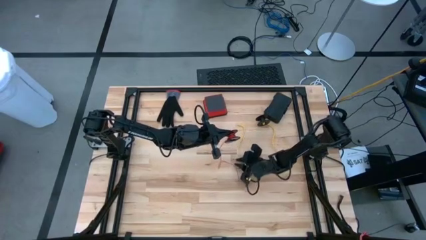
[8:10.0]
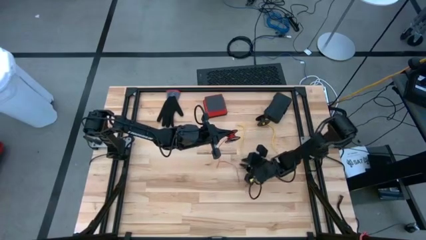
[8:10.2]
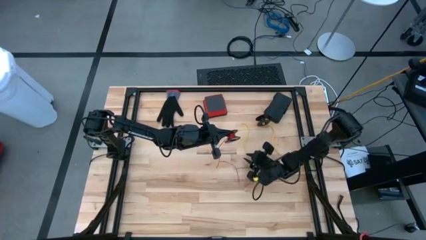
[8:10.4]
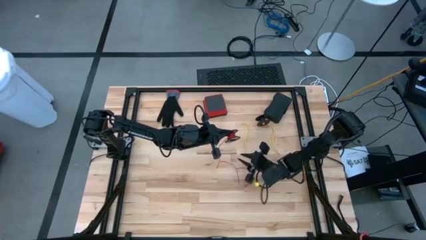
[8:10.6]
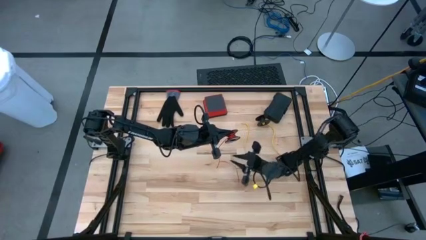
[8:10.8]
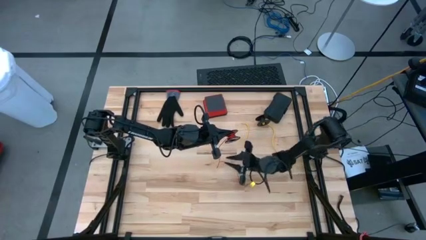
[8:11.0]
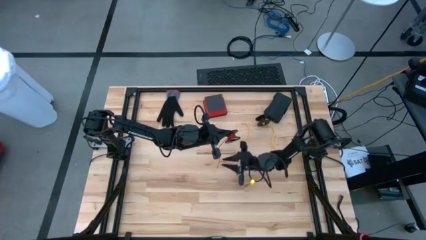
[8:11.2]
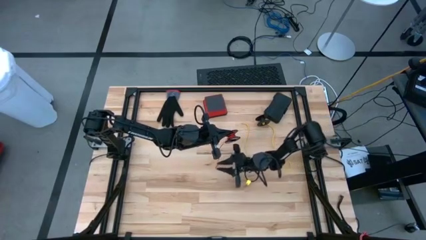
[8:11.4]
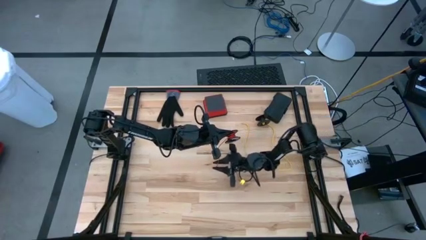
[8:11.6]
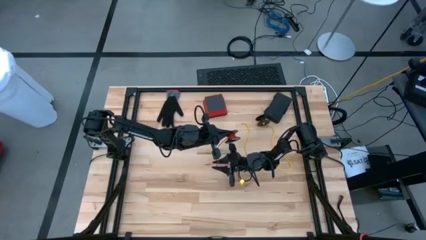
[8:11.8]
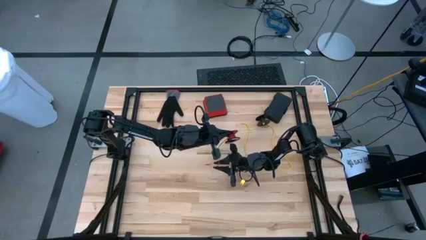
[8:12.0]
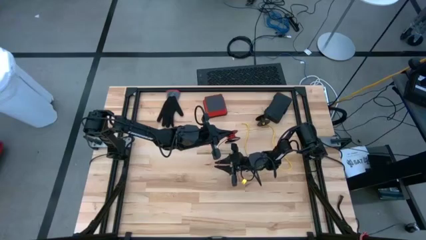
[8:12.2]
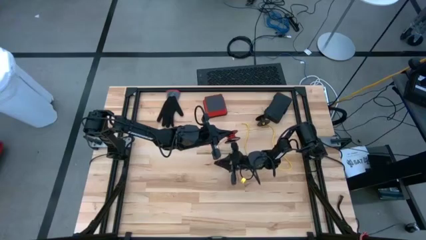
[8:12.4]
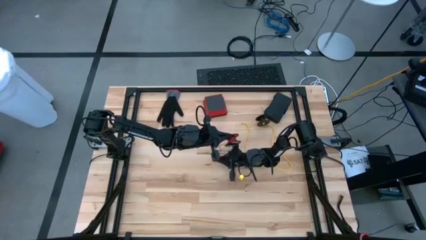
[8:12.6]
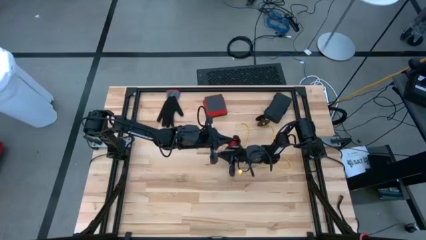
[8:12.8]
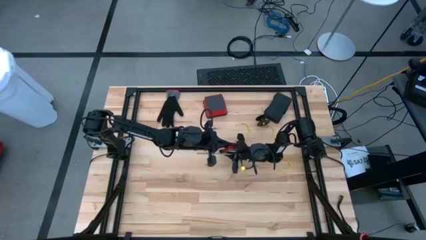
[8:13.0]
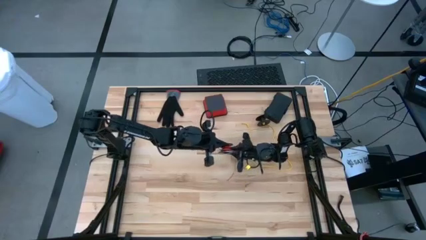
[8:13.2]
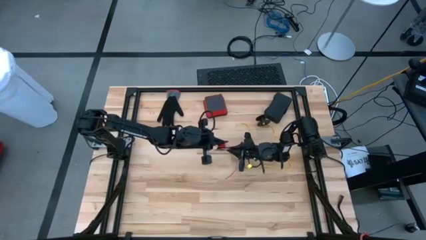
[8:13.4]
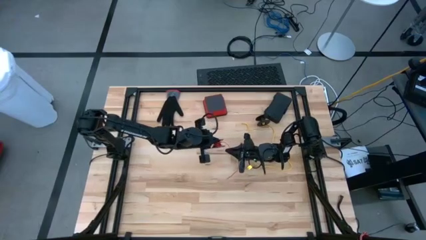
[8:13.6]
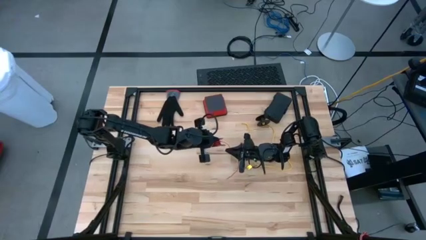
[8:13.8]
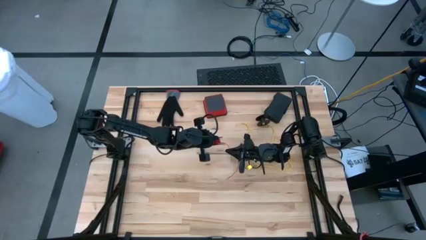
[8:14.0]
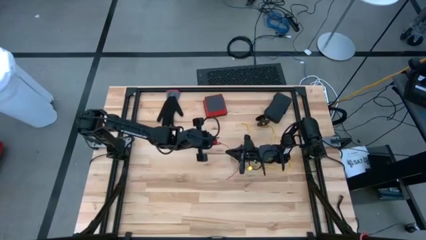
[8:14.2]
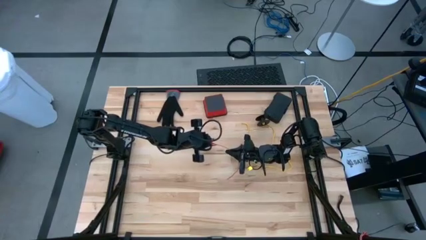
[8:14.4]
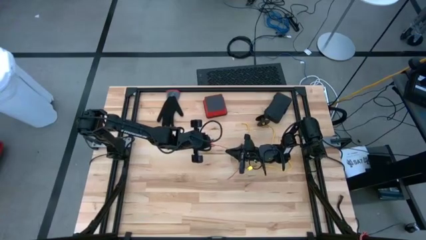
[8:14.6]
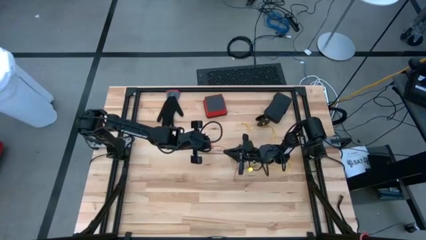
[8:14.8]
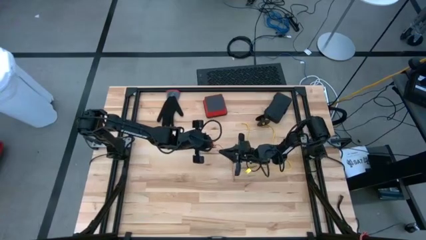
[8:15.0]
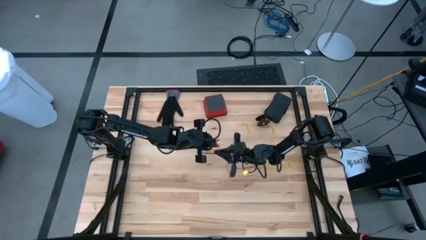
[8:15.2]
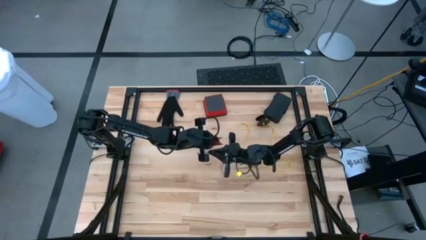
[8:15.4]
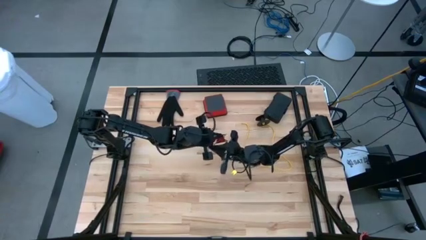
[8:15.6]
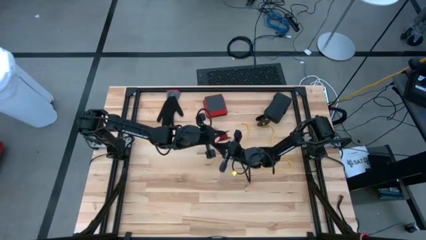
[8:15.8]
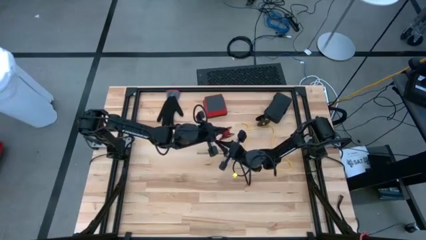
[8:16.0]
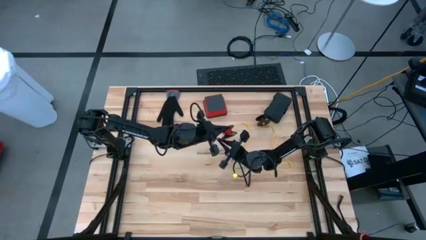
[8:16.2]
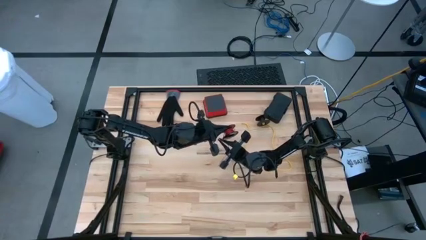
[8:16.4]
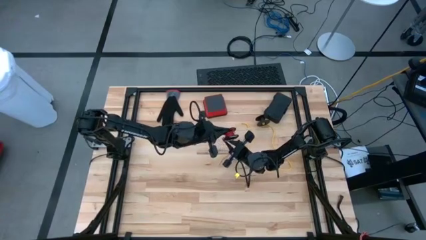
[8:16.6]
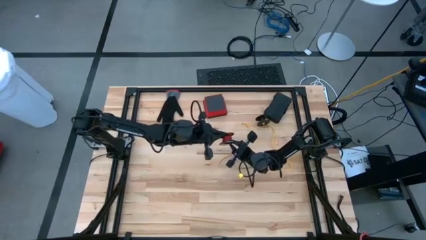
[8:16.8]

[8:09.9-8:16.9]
Task: Coil cords
Coil the red wire onto the spool

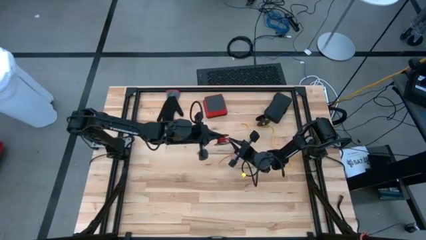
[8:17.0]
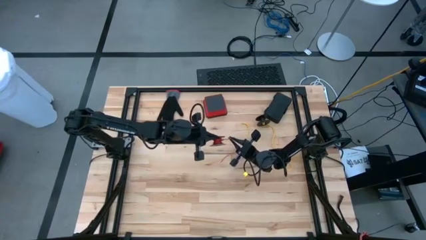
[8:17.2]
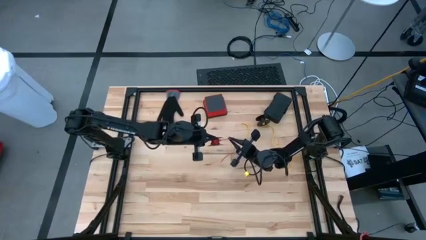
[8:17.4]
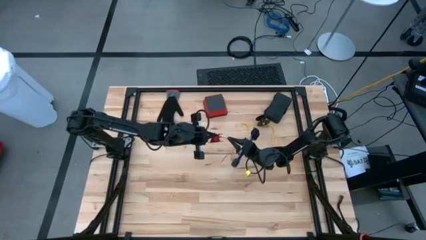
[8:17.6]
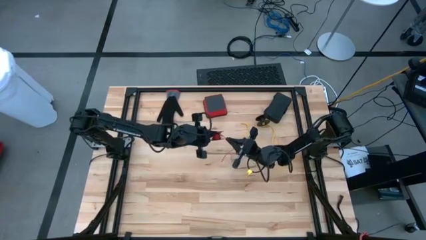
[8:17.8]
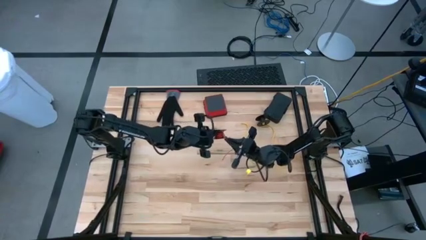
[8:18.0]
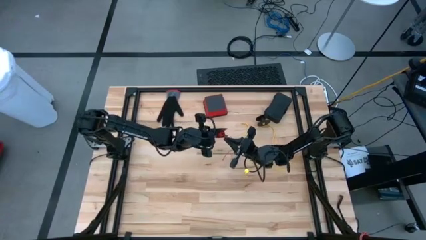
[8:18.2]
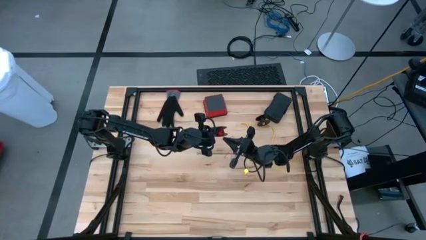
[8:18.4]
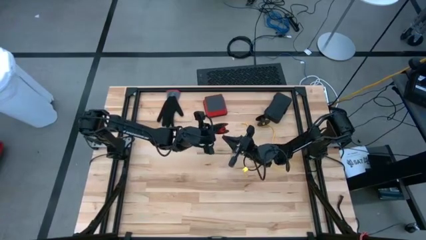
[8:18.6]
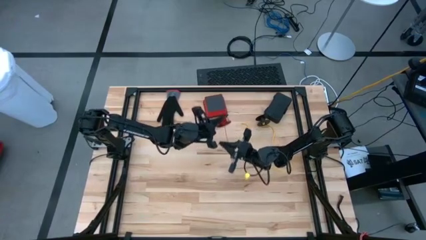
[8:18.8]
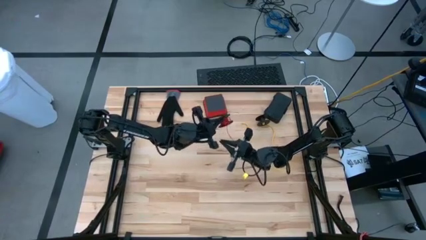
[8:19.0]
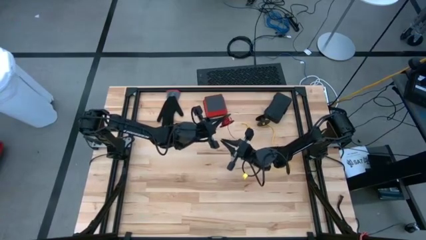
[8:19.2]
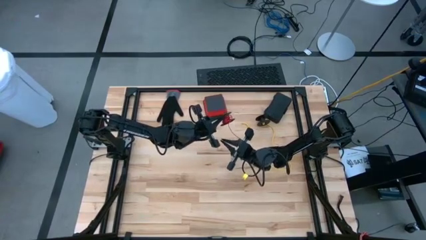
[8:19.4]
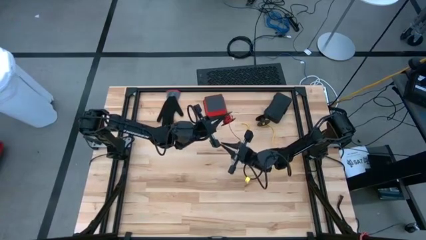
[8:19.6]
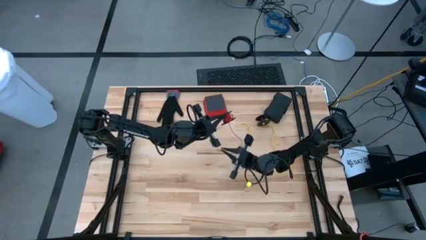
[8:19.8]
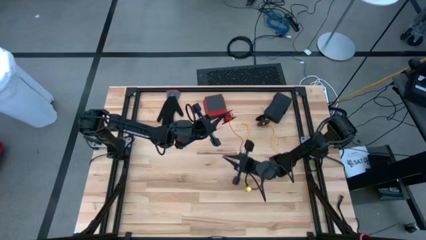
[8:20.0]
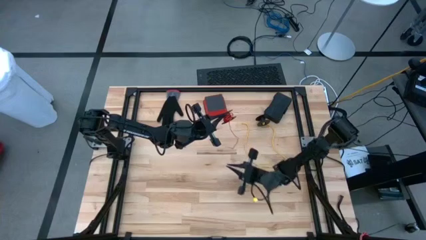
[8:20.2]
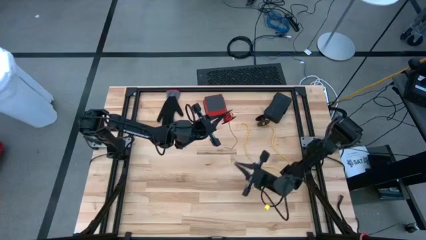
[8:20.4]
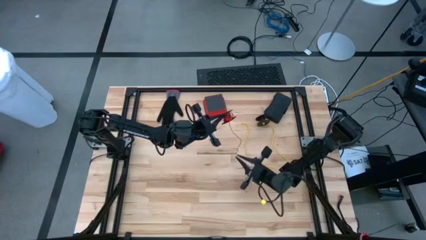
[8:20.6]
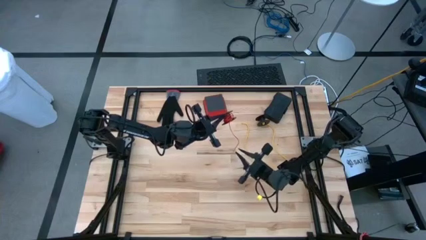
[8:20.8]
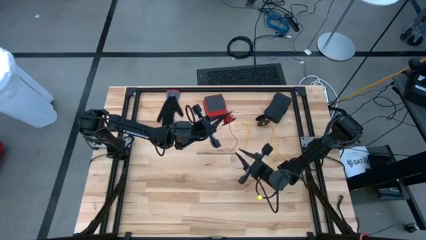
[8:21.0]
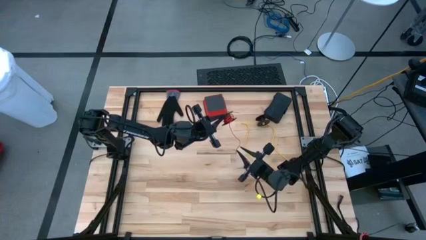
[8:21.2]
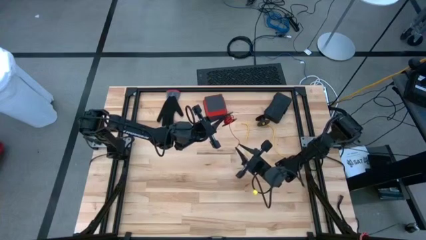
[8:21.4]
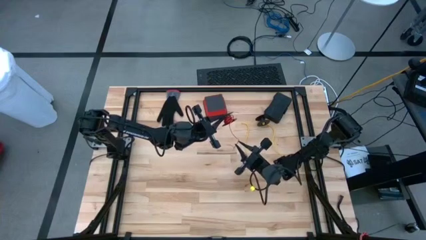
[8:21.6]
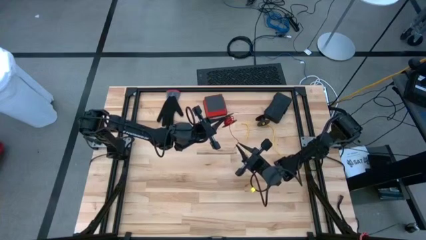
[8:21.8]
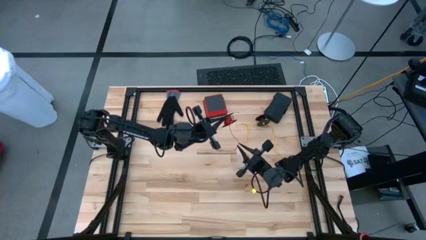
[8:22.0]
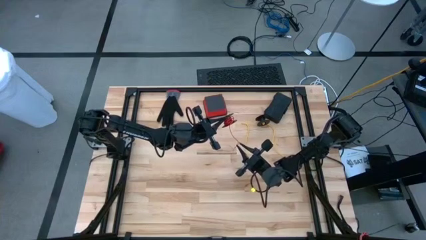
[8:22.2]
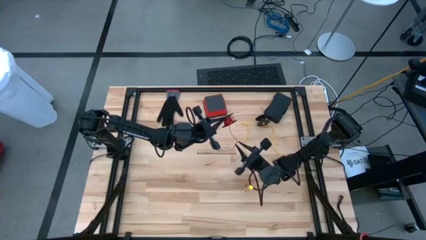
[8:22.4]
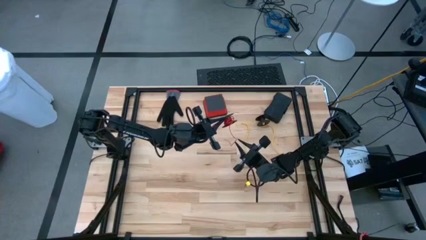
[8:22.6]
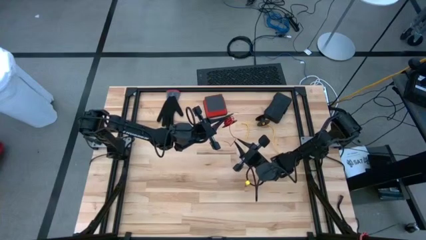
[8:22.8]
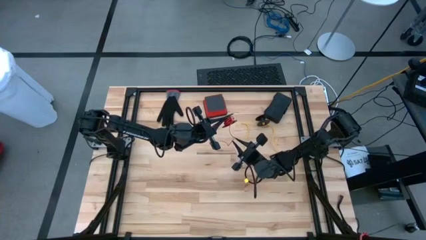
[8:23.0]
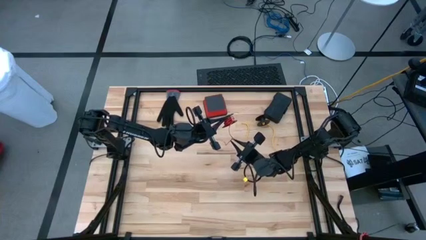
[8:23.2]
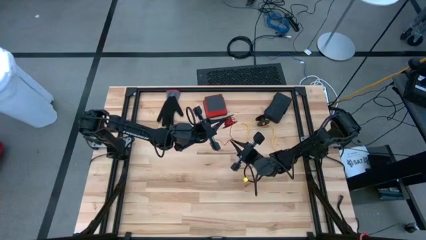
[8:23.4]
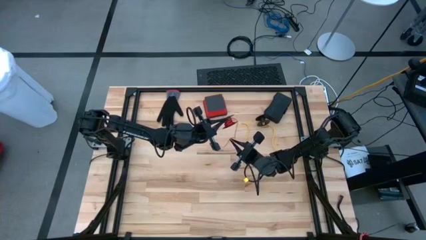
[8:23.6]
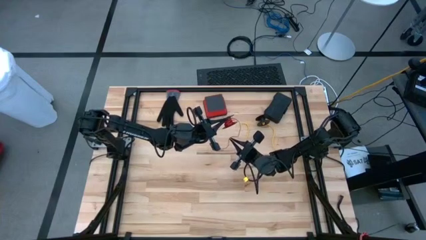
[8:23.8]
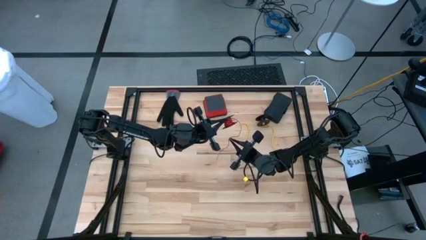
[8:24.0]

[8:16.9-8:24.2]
Coil the red wire onto the spool

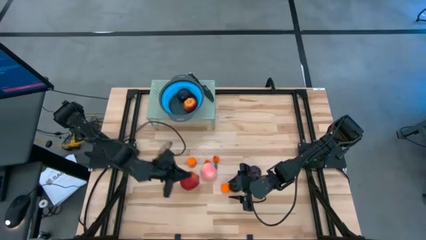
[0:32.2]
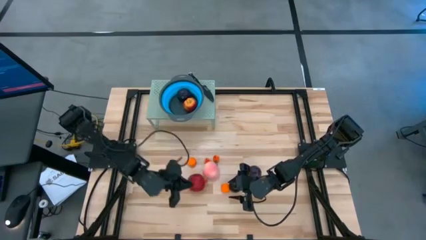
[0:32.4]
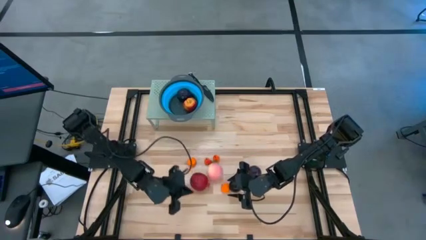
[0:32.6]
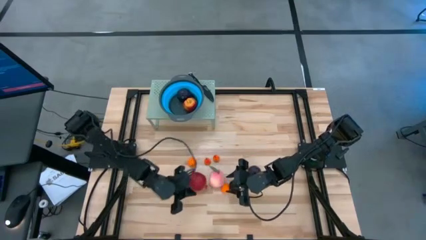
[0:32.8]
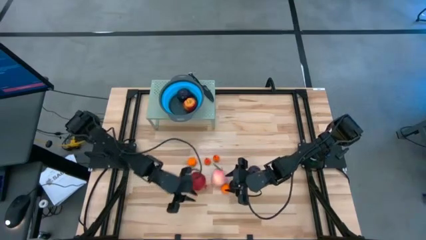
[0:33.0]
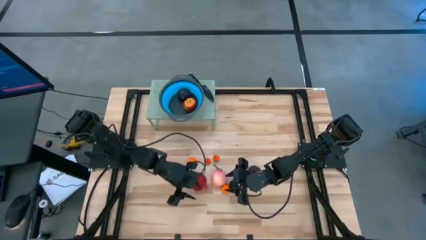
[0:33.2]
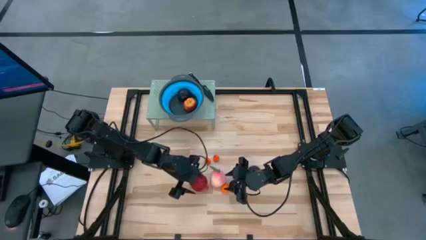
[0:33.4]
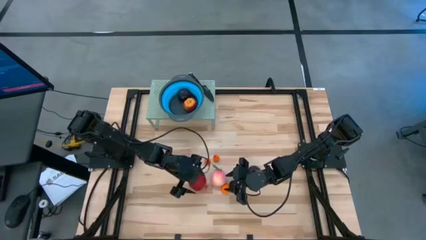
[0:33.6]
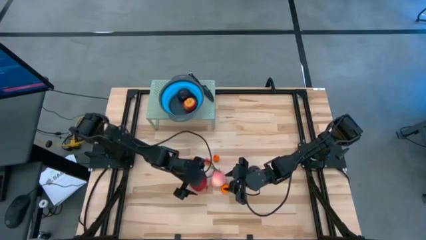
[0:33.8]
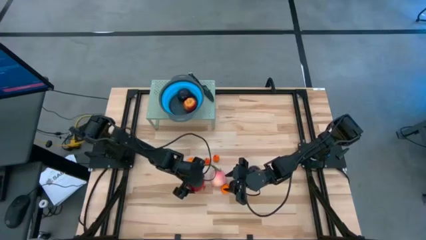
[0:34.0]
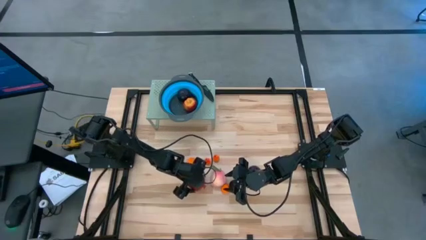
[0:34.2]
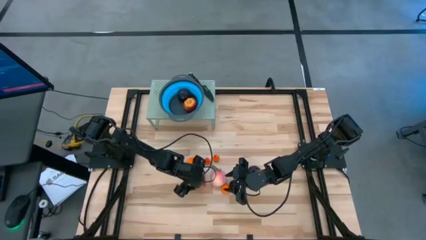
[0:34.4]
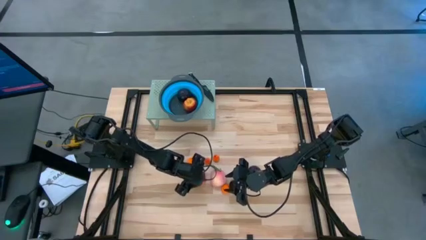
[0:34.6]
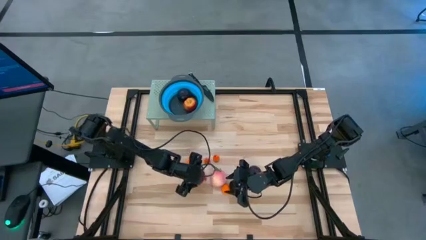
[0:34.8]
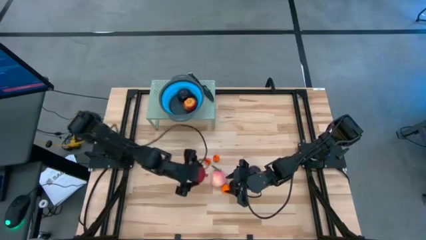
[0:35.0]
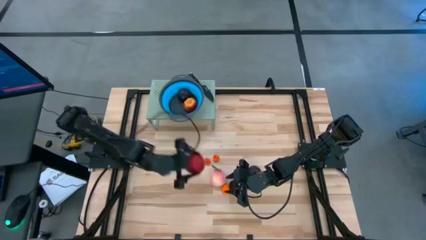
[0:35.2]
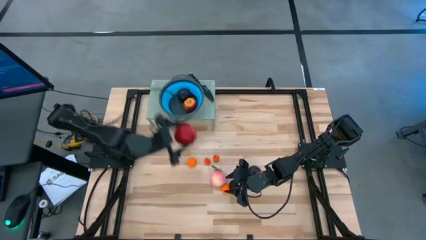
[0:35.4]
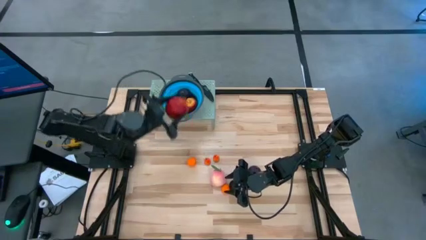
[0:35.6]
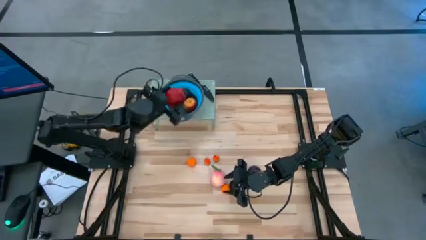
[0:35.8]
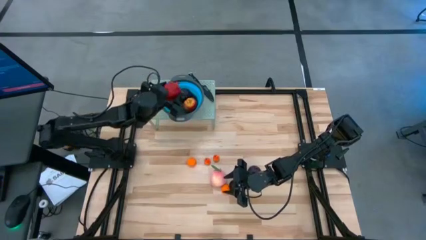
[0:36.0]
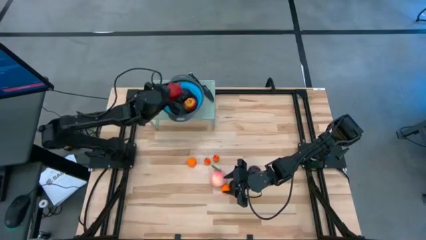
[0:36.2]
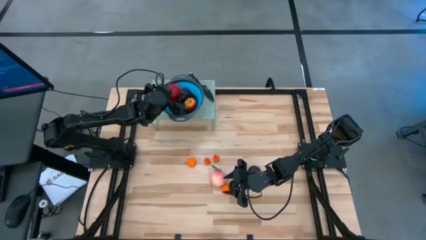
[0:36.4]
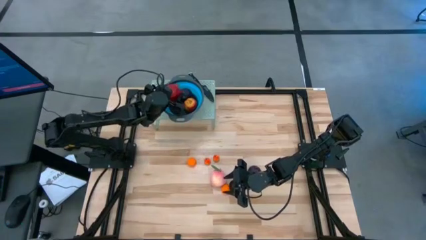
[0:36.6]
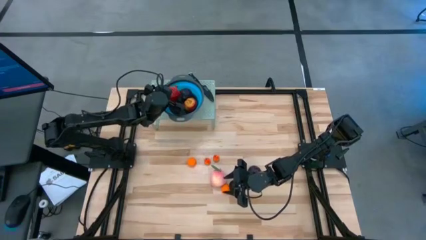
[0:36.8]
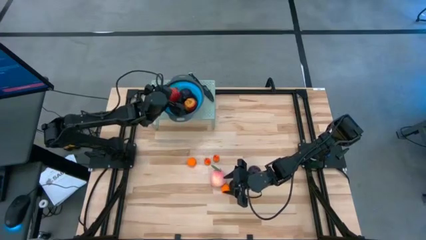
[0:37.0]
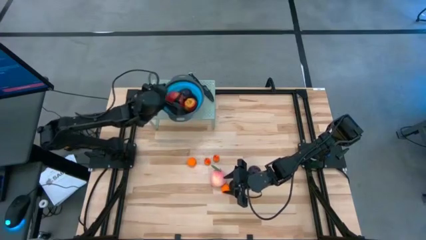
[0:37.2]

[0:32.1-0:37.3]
Task: Pick & Place Fruit
Put the red pomegranate into the blue strainer bowl on the shelf
